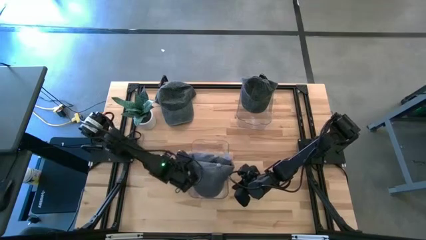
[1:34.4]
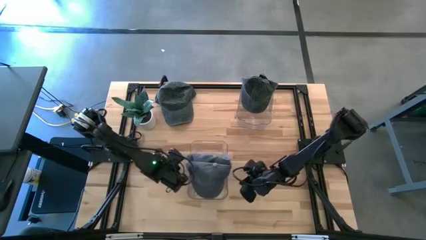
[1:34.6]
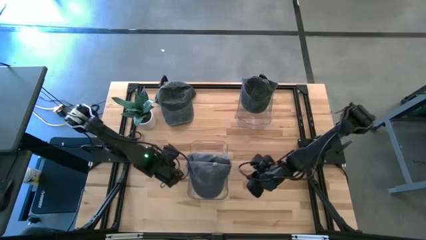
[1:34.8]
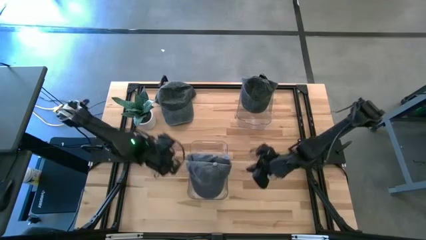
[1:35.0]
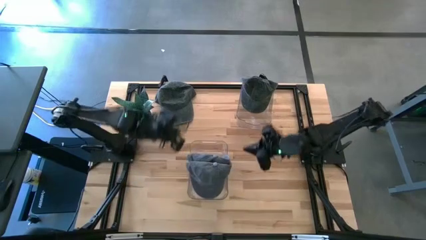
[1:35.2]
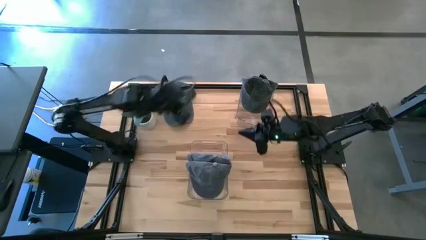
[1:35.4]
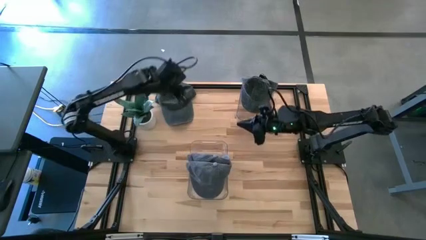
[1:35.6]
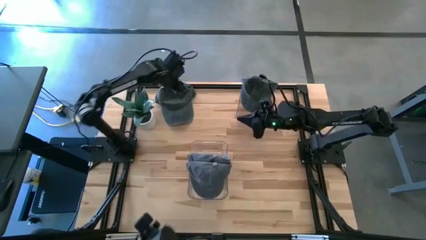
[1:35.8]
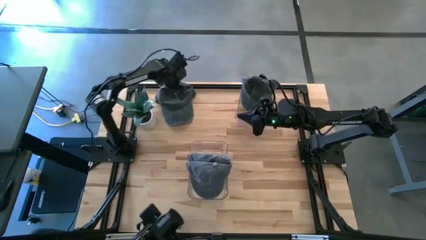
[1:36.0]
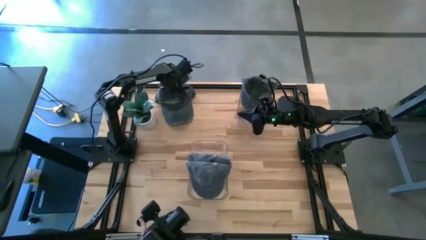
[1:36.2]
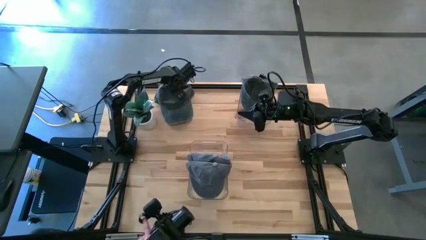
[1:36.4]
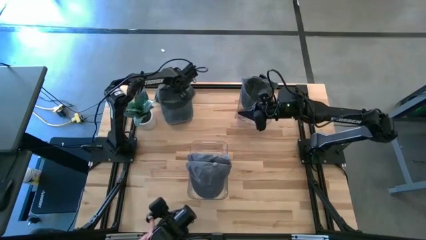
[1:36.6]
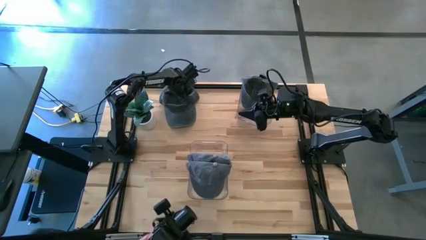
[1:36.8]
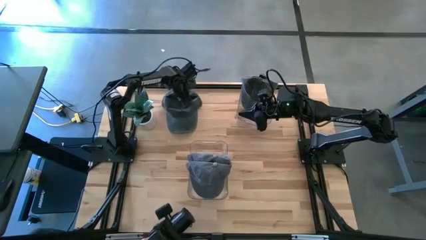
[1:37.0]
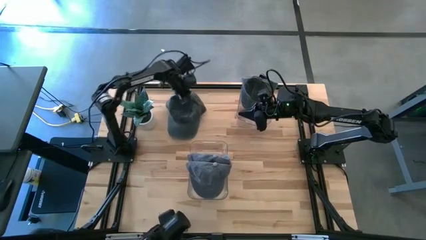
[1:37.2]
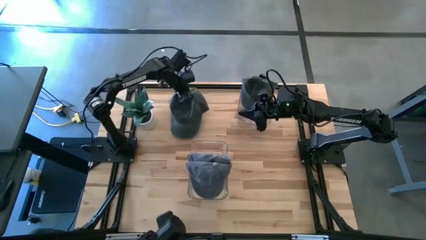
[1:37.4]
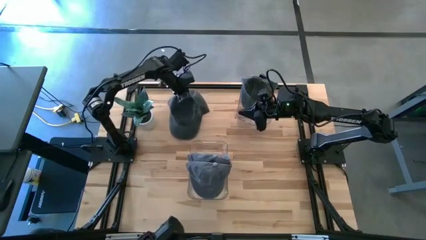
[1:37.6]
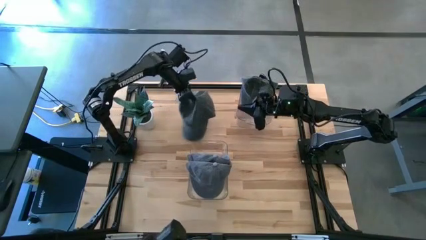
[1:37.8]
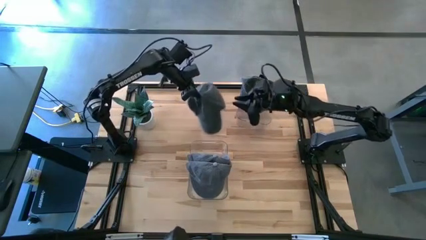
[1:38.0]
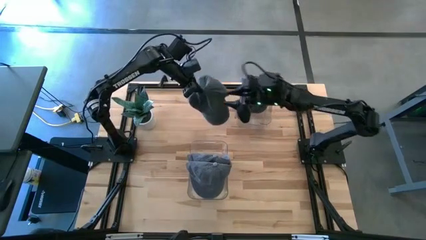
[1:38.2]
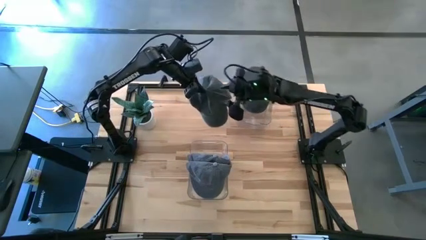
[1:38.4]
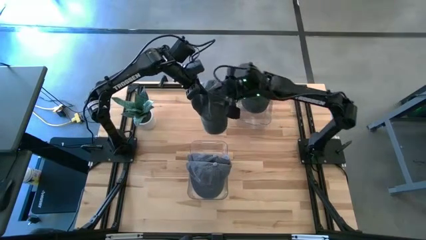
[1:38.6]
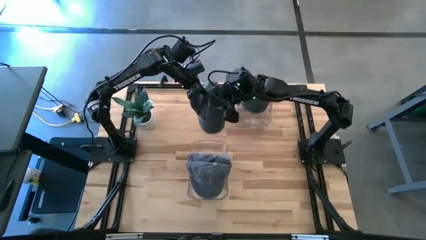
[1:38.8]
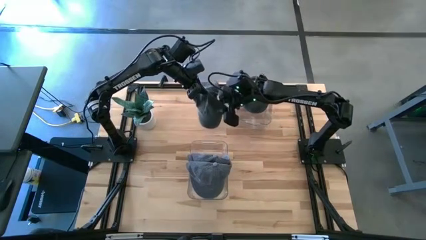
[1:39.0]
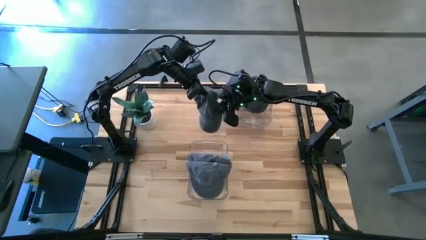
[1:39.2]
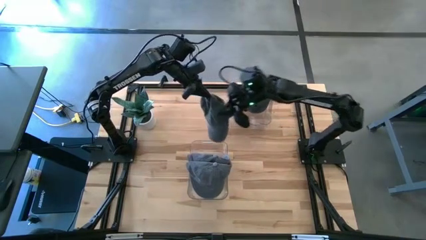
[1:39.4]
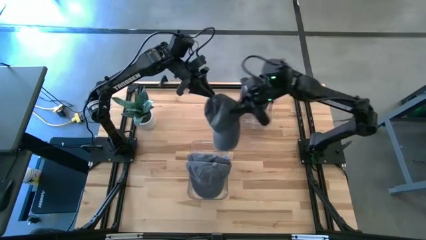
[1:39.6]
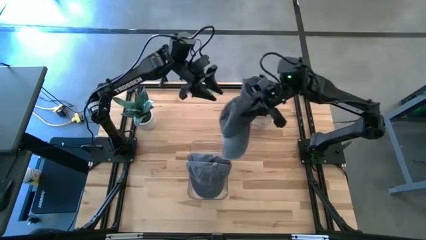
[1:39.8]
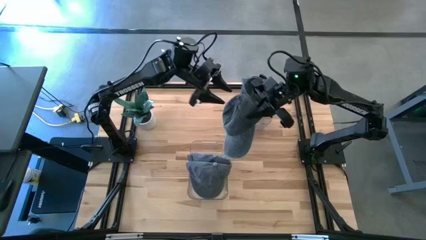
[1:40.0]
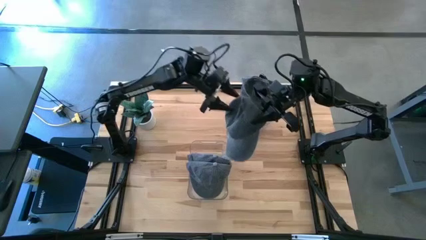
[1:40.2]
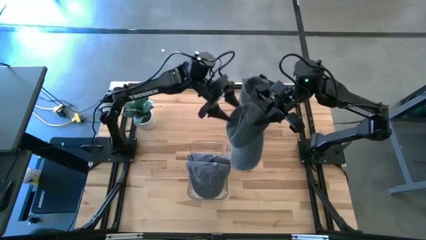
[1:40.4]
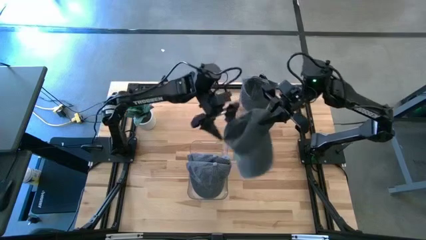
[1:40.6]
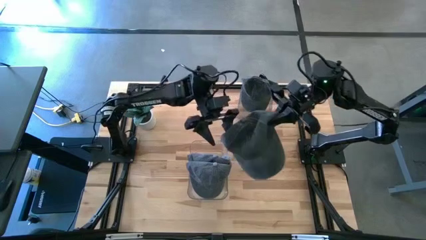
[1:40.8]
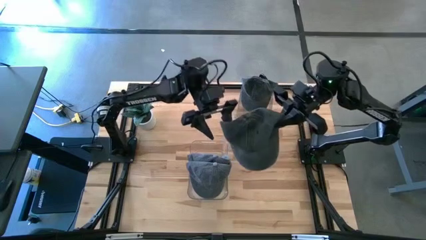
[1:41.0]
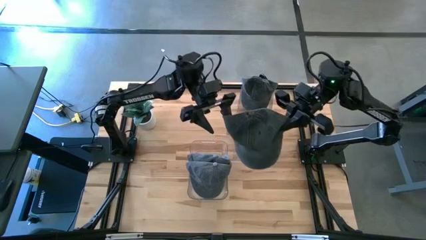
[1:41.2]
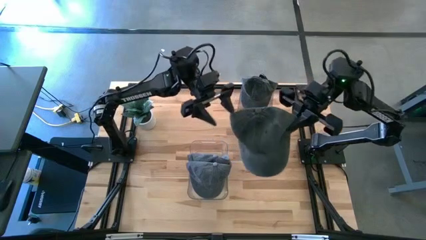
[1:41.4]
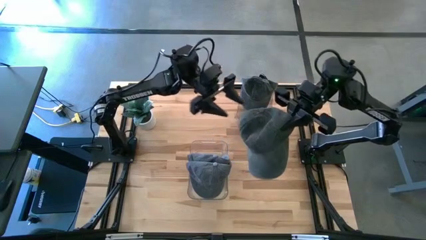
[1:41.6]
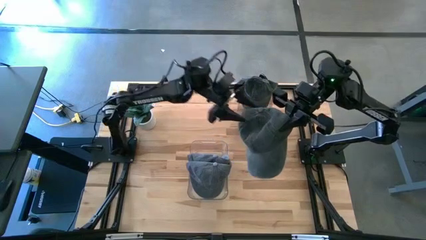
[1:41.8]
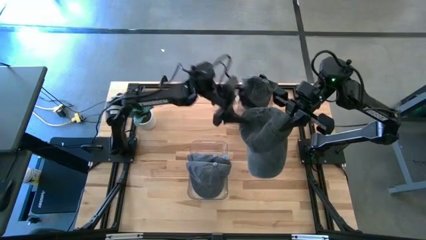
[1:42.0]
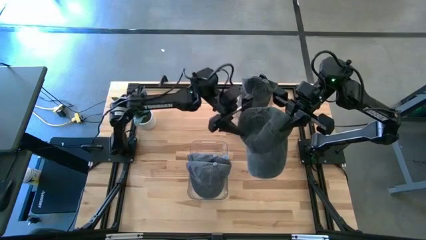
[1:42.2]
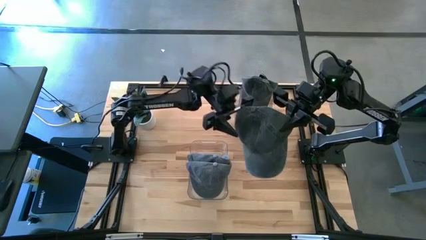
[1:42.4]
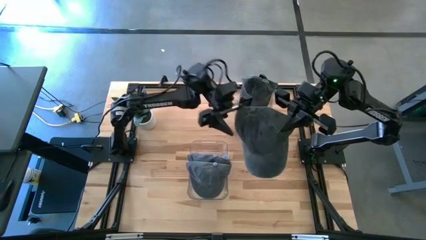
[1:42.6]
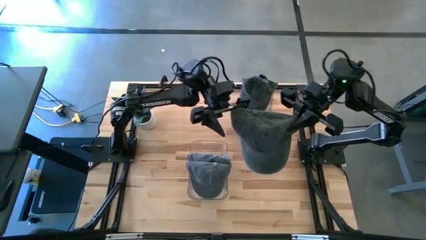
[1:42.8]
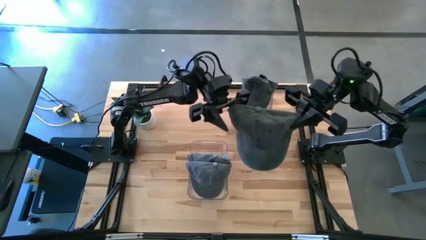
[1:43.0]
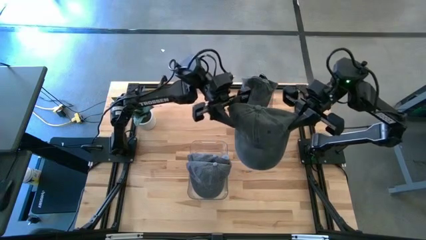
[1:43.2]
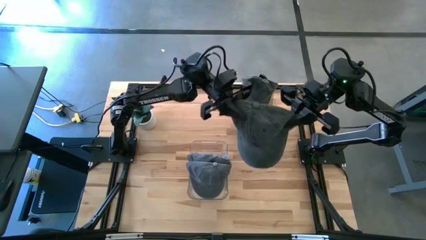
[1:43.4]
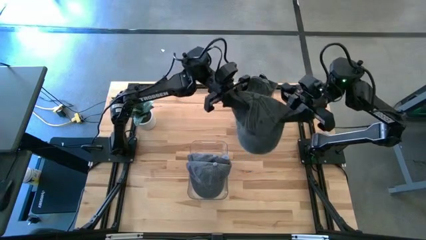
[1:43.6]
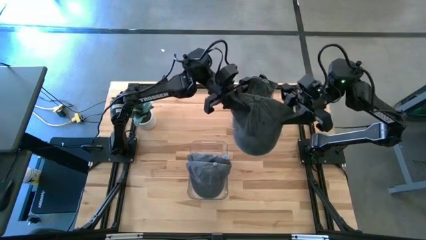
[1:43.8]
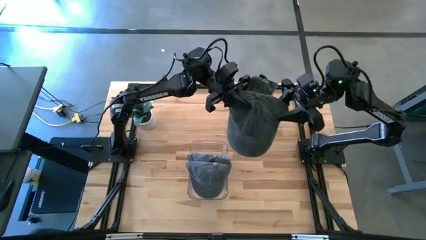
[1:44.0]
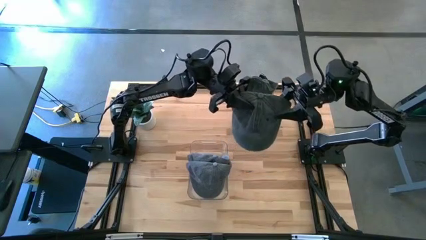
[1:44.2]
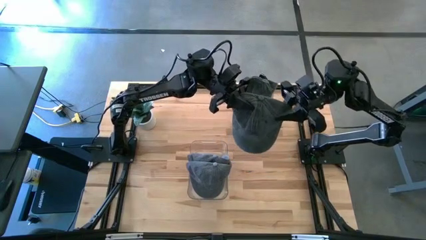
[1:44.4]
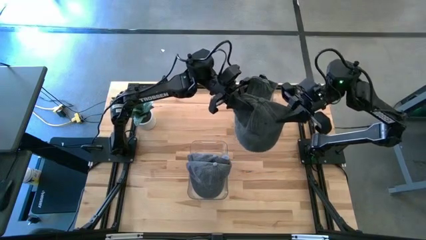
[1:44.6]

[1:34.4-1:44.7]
Task: Pick & Place hat
Put the black cap into the top transparent bin
